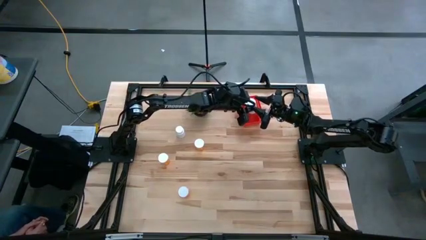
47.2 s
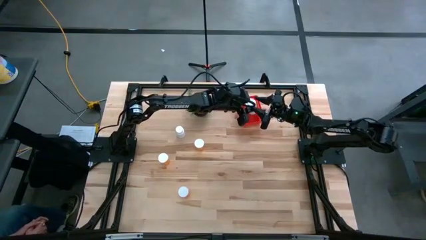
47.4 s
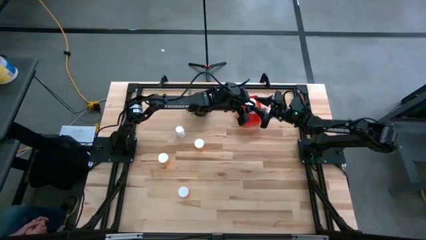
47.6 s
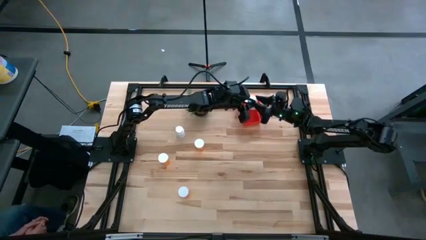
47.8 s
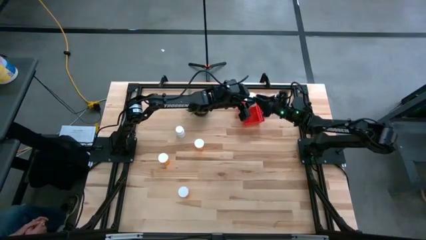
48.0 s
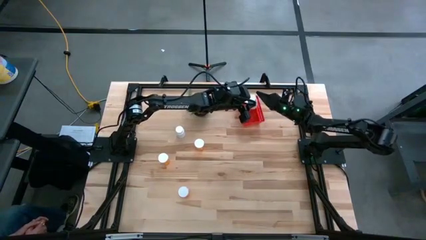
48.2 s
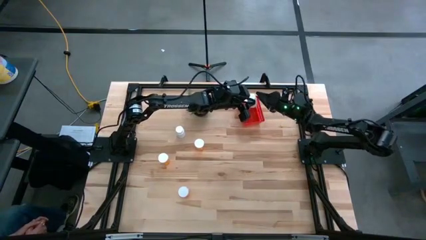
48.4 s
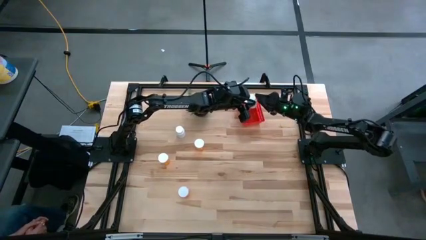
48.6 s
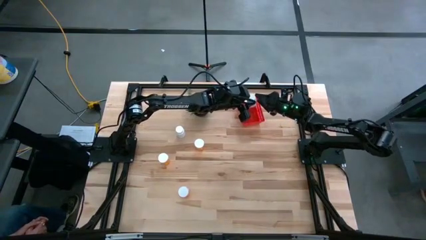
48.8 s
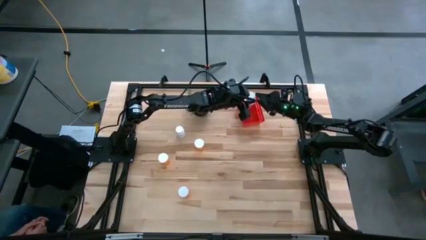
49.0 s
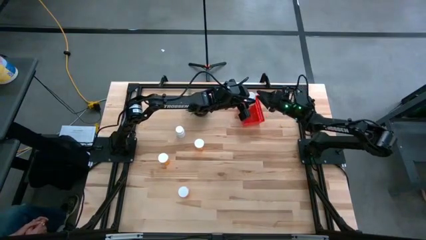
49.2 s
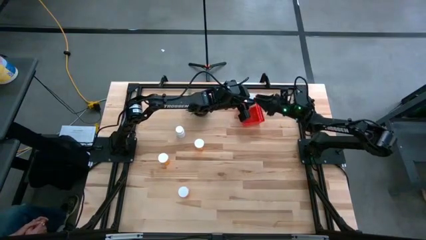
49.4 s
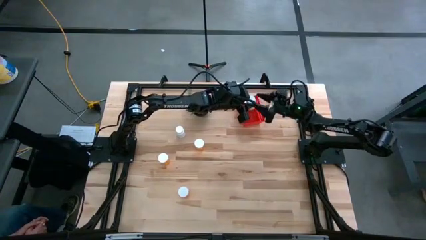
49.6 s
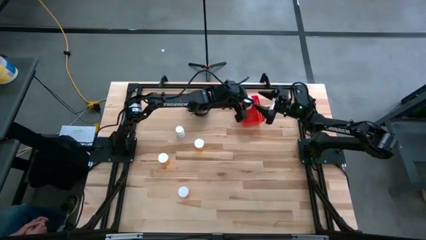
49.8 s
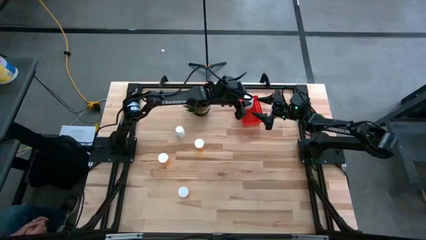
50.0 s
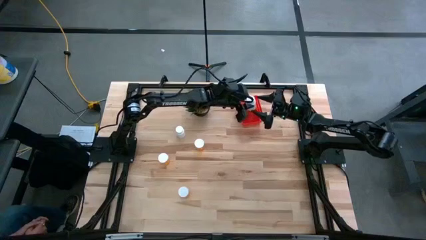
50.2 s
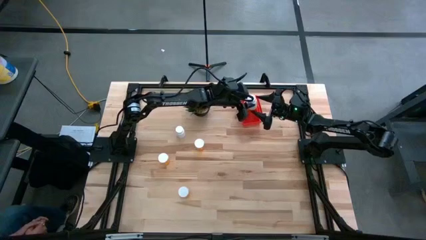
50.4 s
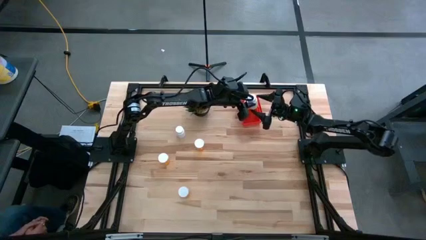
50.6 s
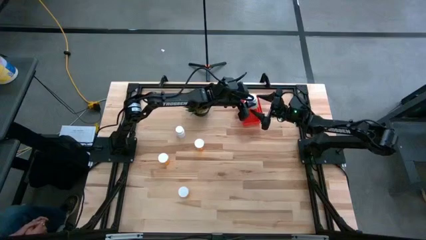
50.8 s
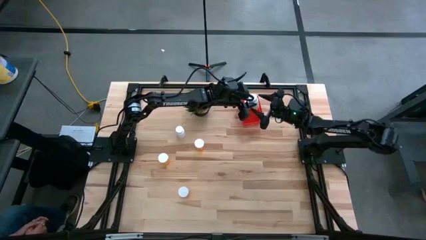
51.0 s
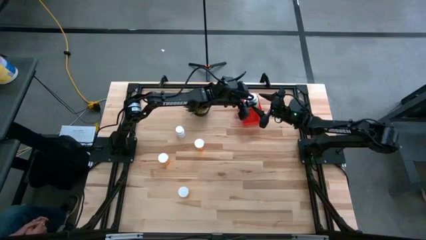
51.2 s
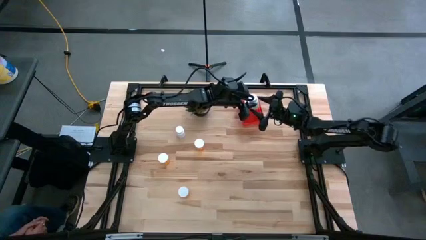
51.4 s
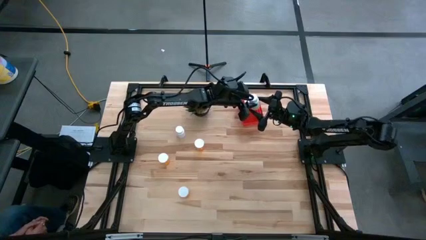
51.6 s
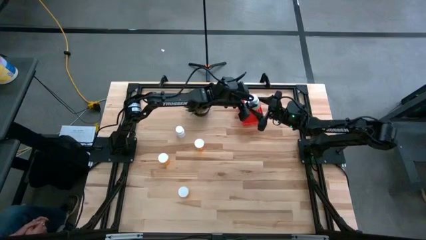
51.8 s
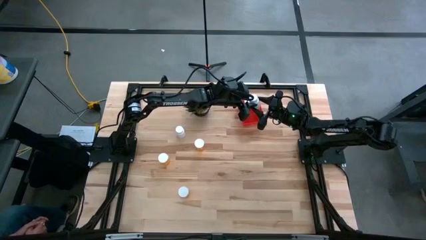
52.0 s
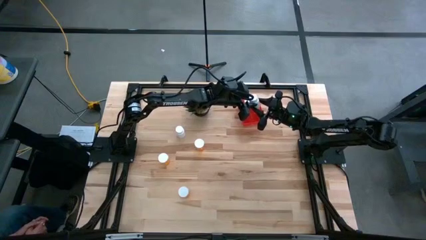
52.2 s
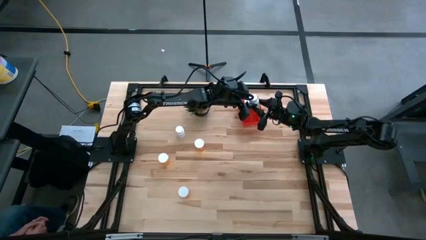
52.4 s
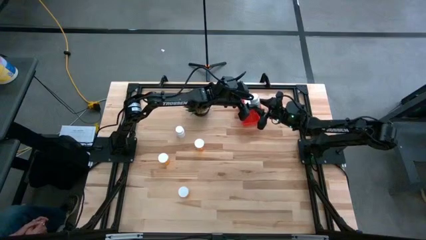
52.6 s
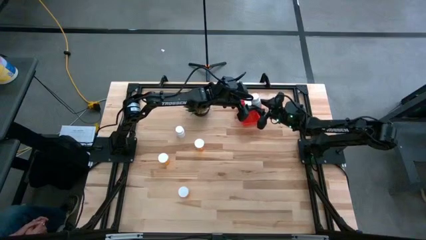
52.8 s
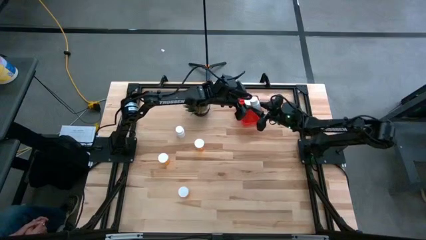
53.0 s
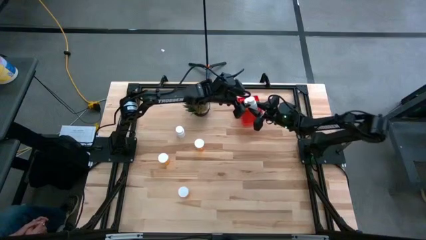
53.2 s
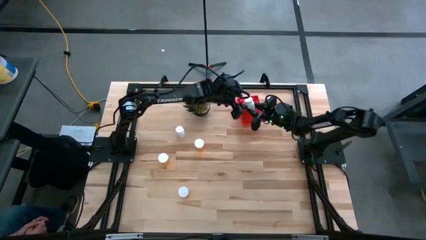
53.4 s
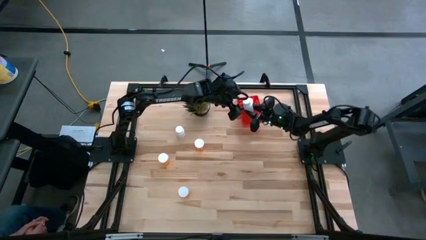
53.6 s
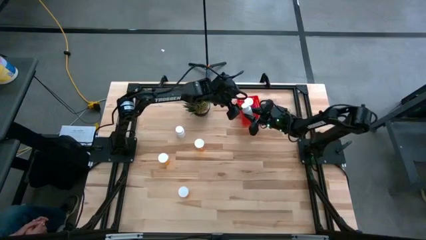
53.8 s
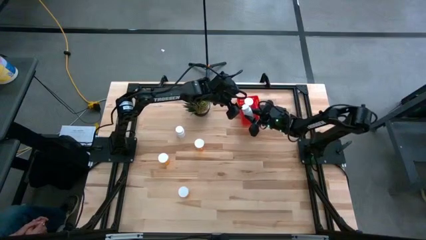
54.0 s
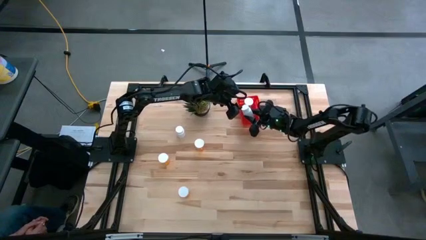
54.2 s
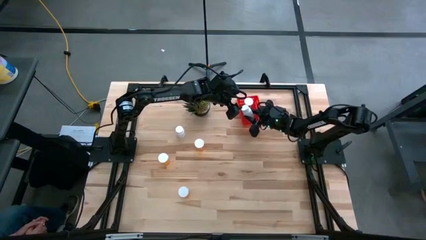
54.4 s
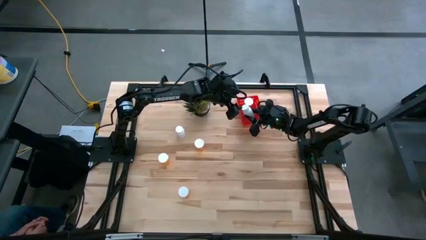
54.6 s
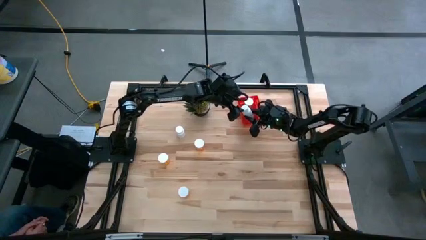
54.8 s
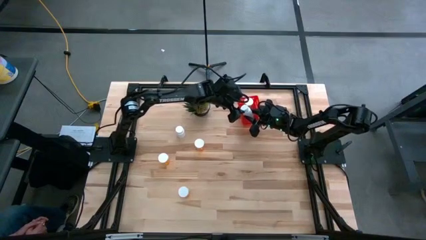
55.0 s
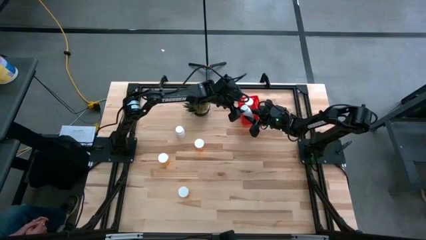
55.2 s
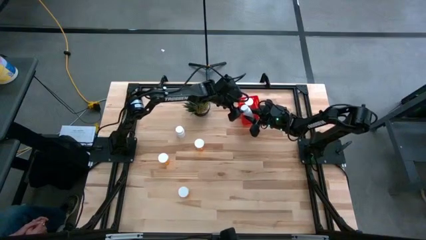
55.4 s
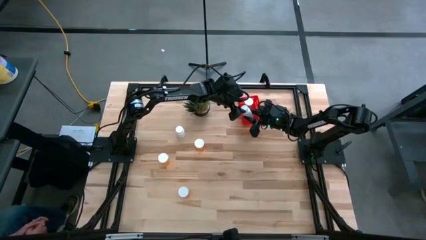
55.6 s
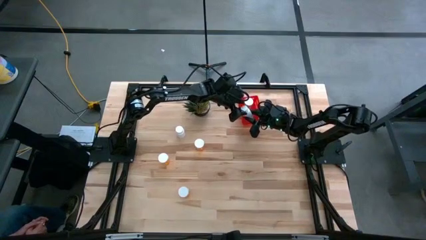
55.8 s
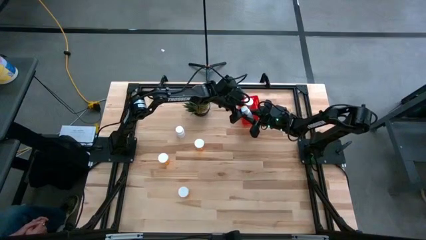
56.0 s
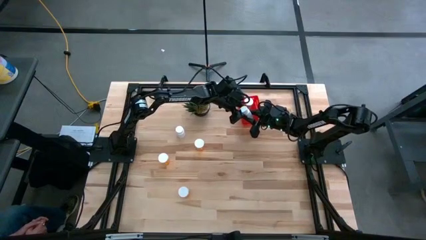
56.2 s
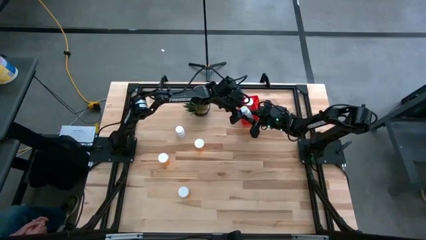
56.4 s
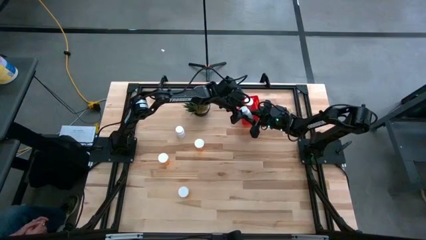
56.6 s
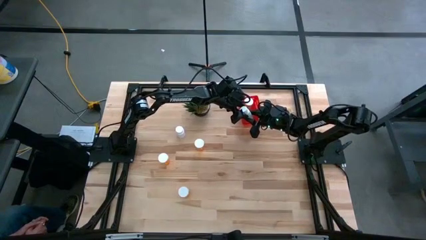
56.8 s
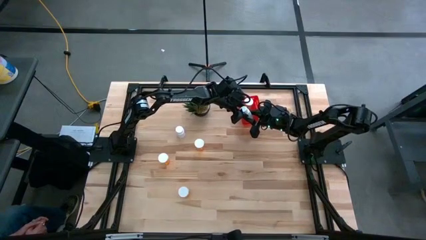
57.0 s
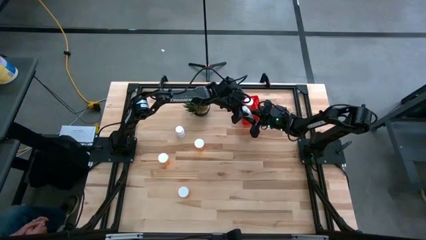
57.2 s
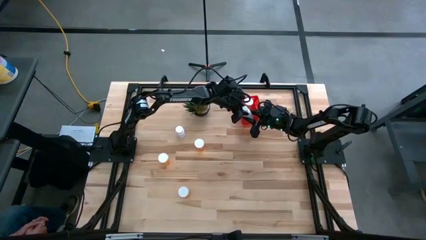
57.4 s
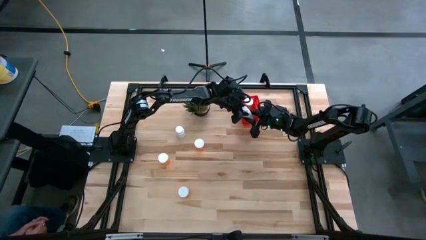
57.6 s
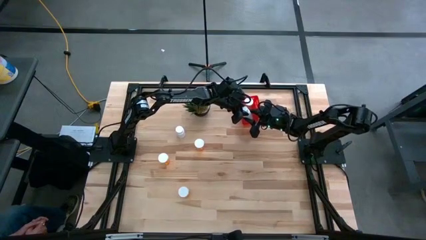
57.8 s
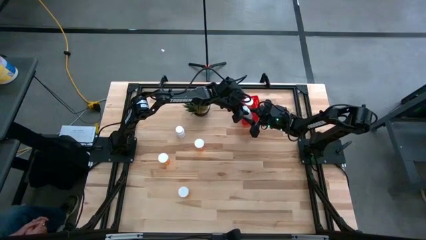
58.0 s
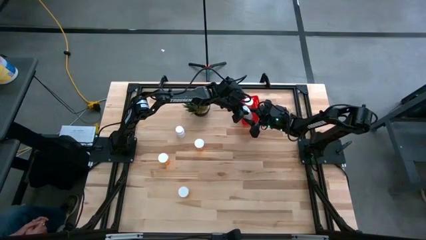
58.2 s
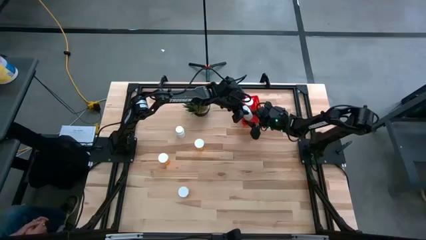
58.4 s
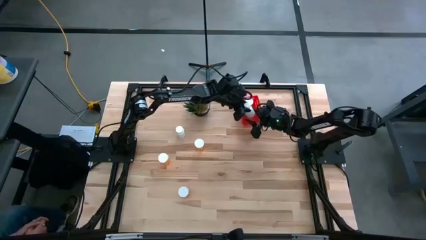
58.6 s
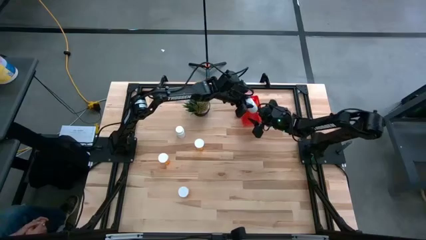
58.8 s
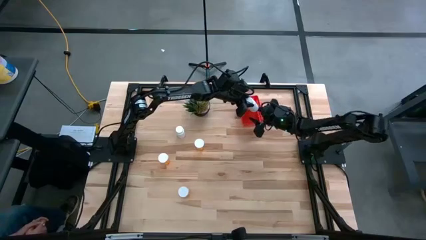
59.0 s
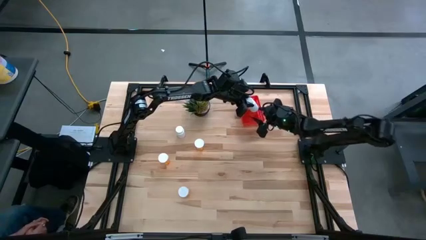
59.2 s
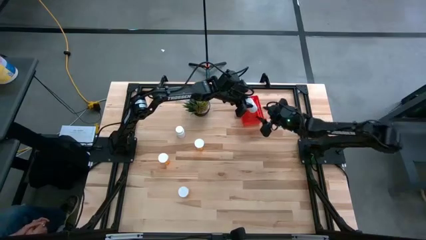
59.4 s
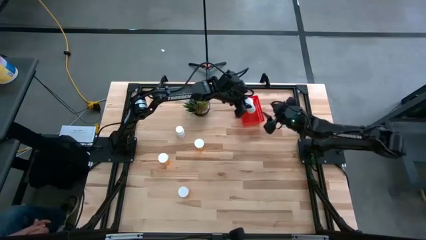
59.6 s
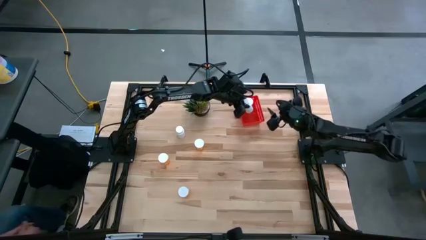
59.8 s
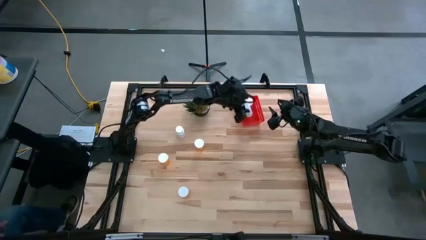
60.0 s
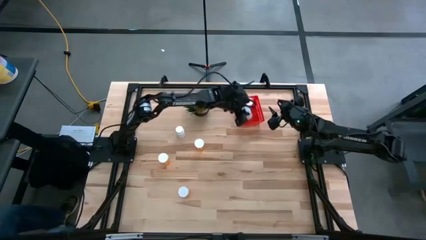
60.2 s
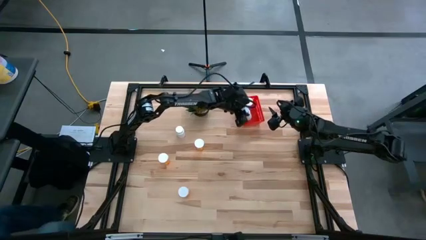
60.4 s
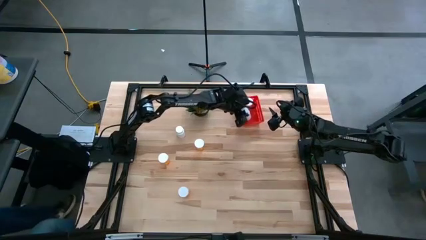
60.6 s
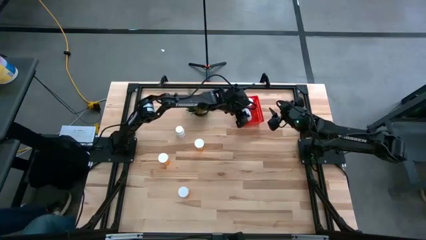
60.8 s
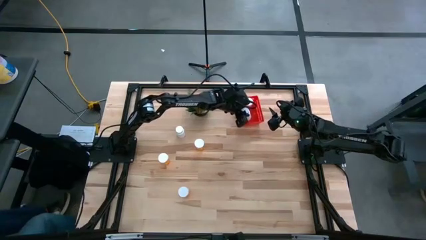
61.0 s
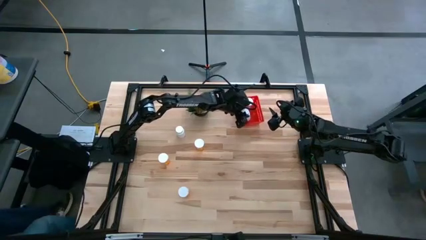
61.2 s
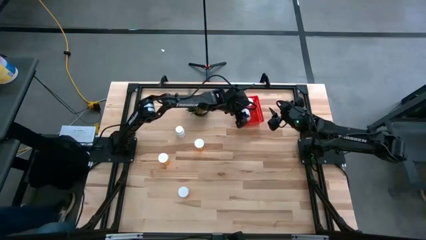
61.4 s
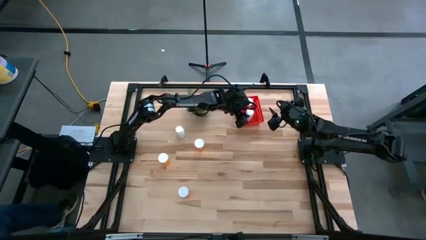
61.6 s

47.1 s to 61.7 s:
Task: Pick and place pill bottles into a basket
Put the top white pill bottle into the bin

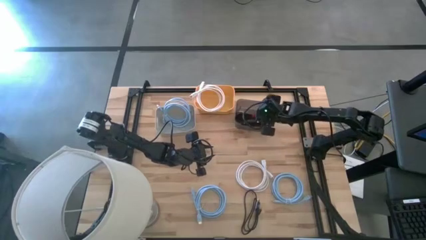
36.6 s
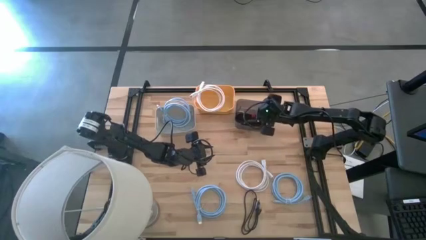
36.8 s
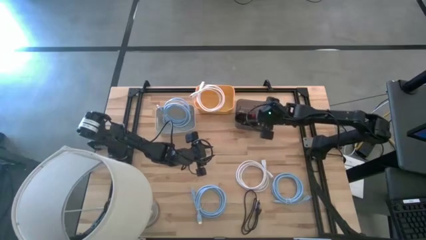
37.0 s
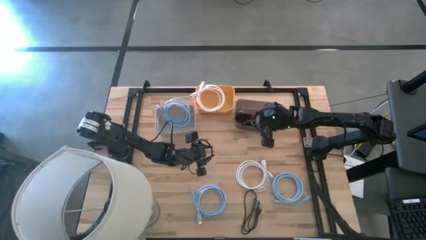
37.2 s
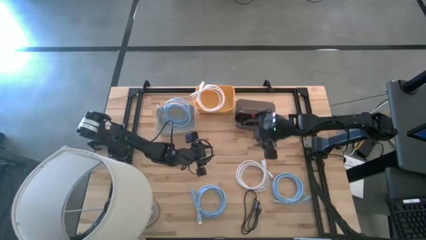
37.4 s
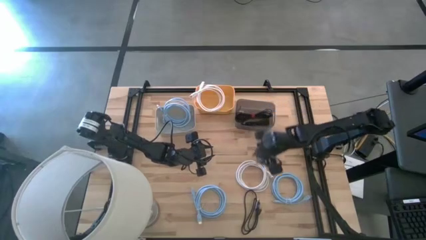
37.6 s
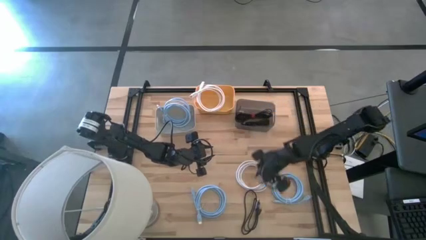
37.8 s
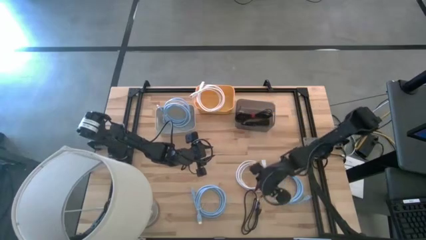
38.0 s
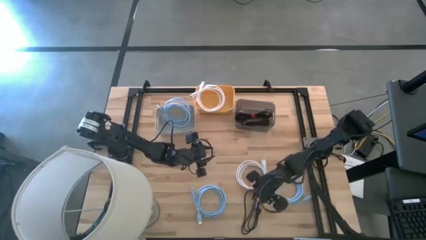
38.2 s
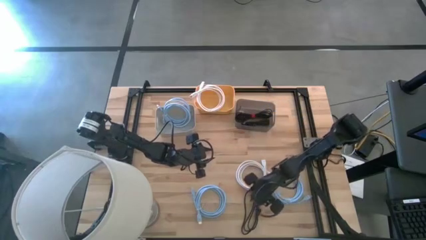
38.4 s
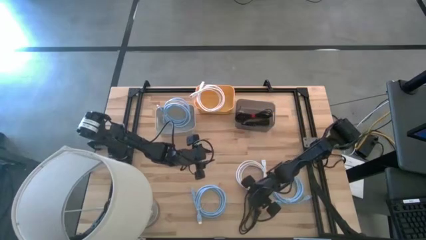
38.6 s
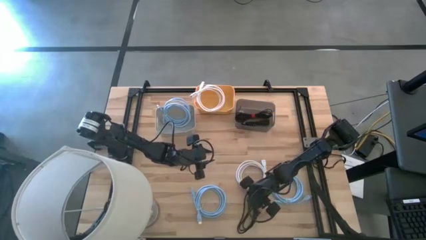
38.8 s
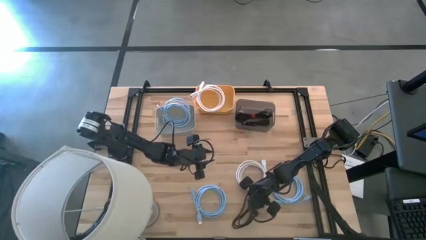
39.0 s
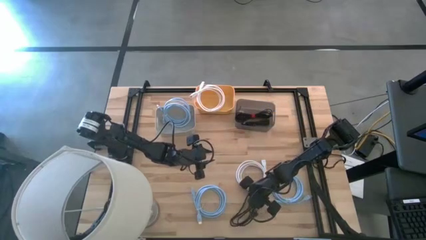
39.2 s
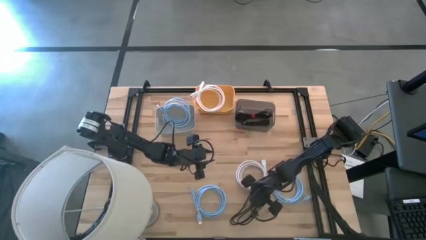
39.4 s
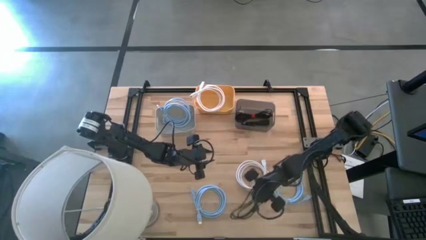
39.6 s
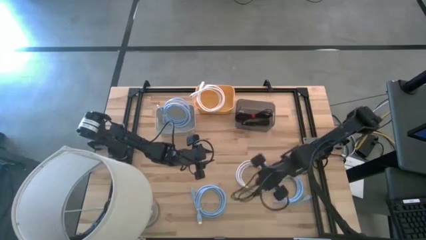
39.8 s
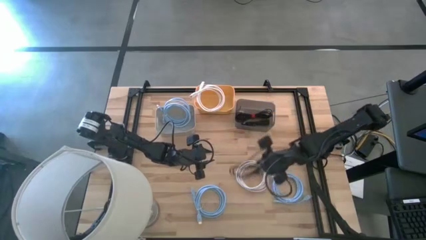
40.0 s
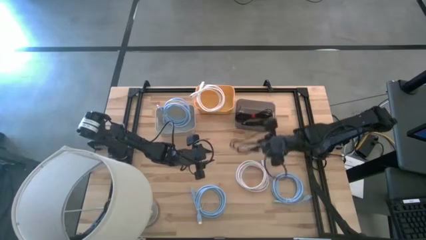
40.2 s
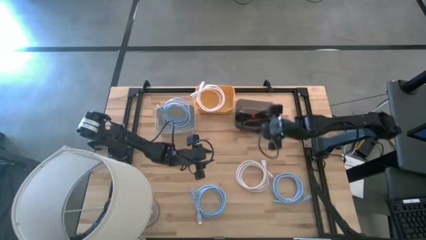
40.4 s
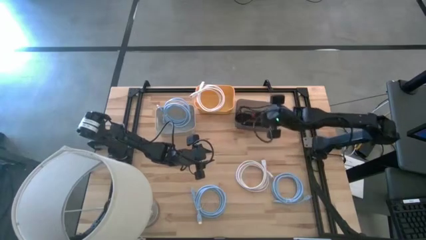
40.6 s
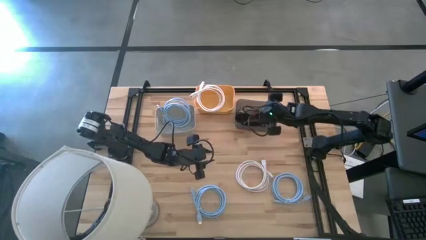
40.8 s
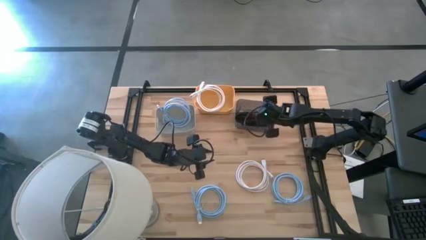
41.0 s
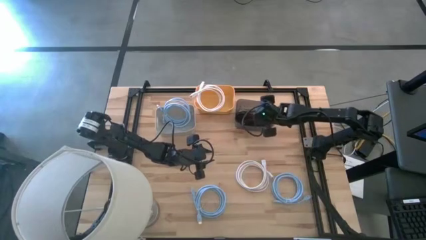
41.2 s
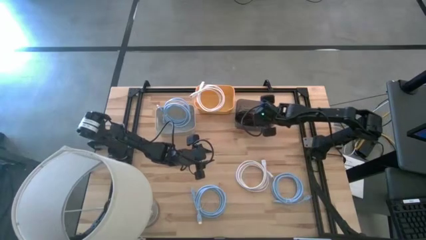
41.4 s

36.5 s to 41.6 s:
Task: Pick & Place USB Port
Put the black charger cable into the black bin
